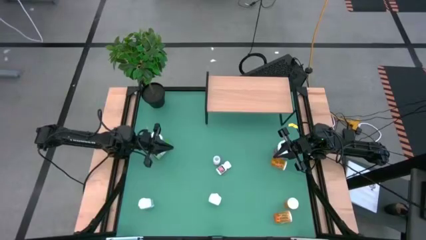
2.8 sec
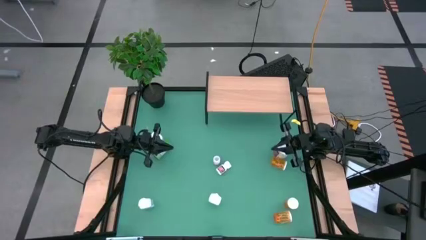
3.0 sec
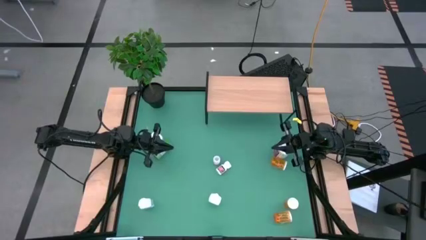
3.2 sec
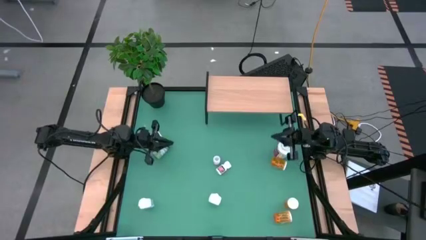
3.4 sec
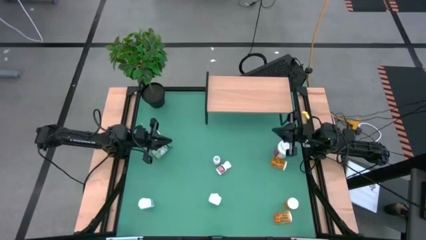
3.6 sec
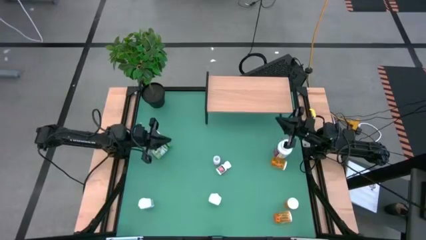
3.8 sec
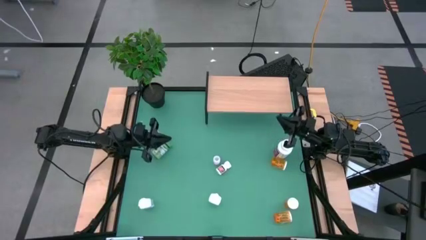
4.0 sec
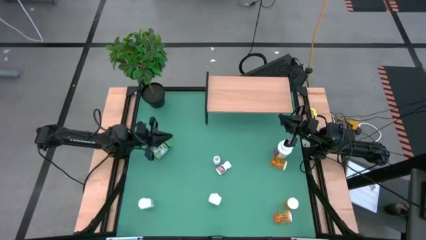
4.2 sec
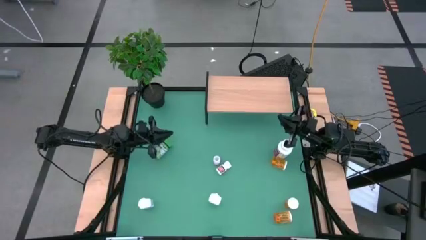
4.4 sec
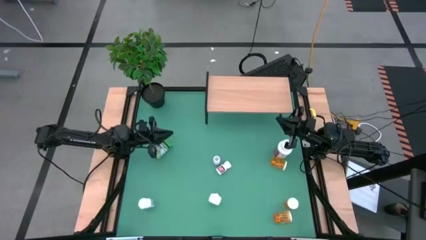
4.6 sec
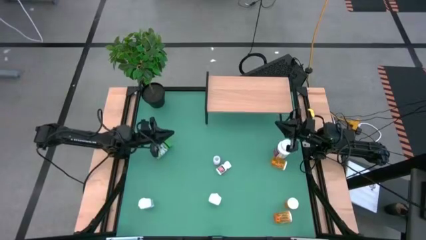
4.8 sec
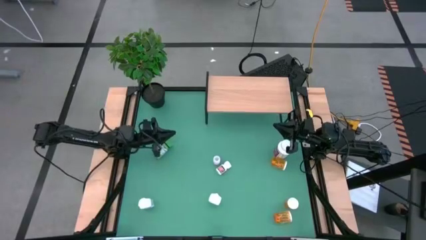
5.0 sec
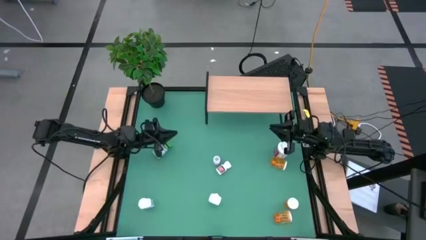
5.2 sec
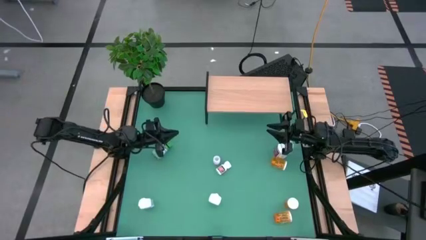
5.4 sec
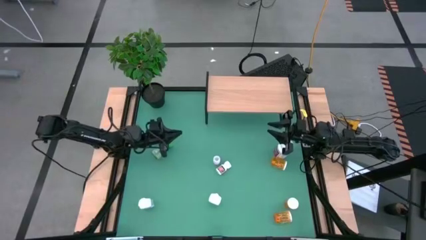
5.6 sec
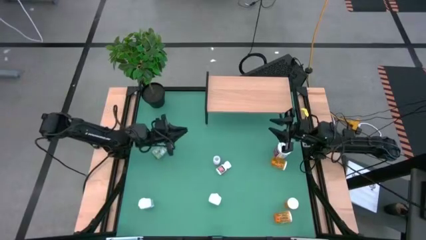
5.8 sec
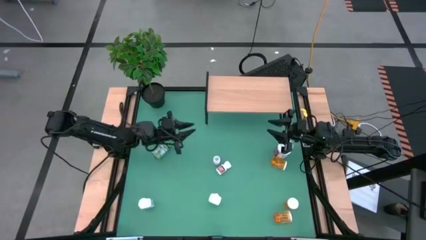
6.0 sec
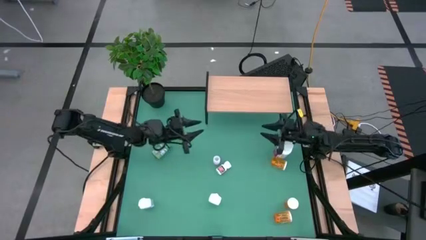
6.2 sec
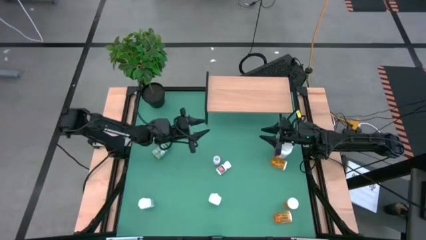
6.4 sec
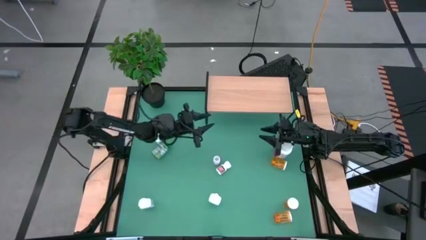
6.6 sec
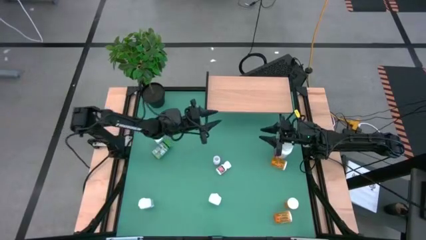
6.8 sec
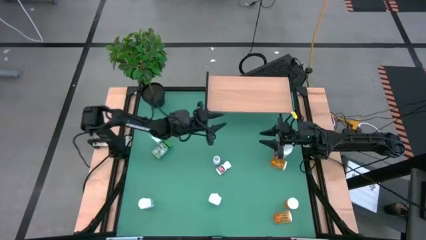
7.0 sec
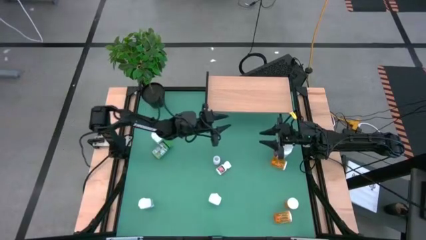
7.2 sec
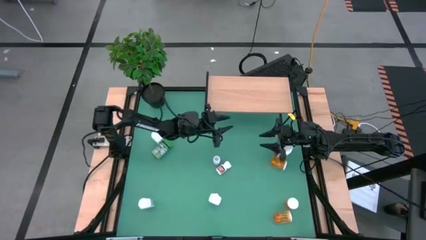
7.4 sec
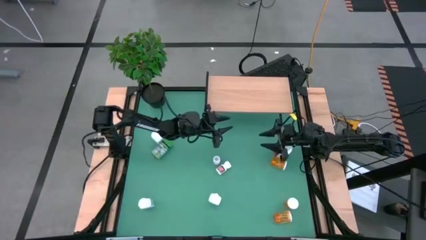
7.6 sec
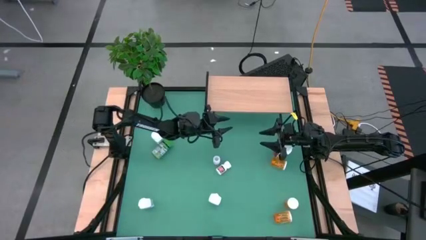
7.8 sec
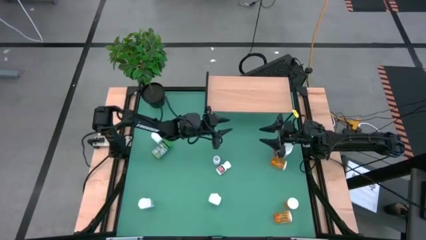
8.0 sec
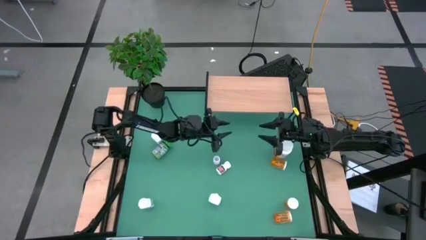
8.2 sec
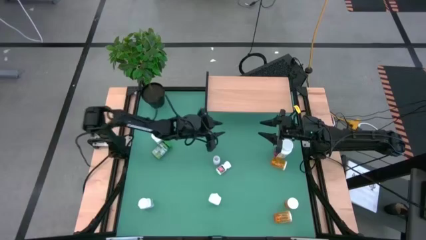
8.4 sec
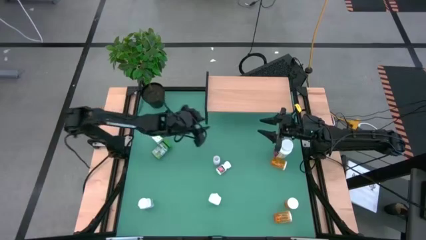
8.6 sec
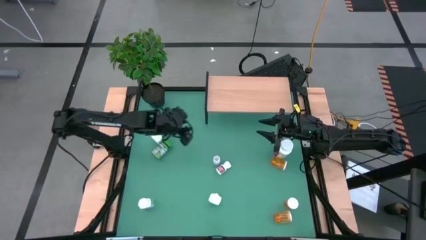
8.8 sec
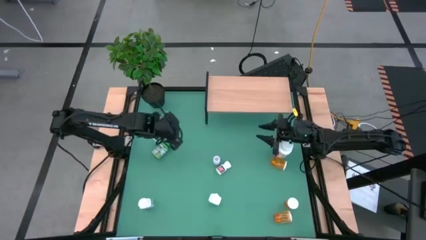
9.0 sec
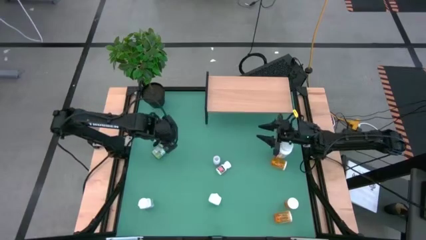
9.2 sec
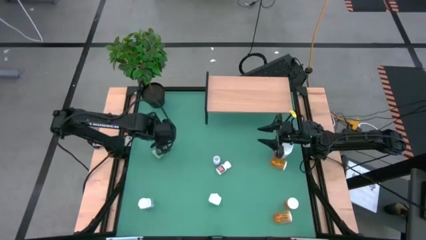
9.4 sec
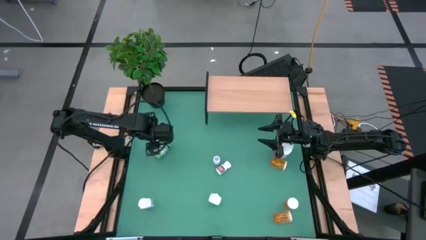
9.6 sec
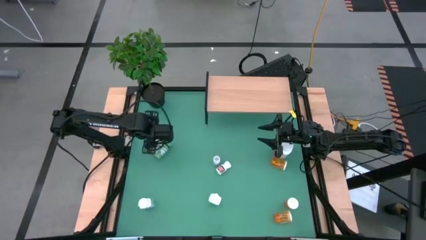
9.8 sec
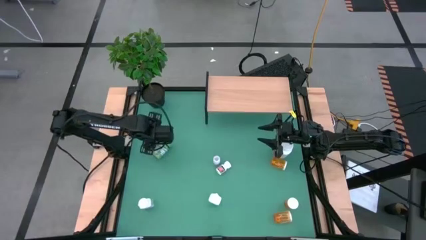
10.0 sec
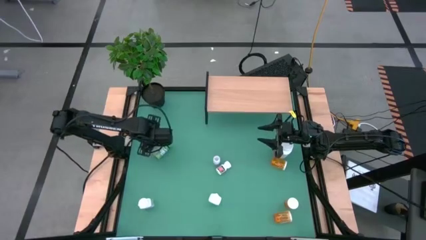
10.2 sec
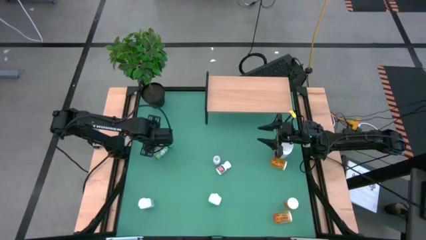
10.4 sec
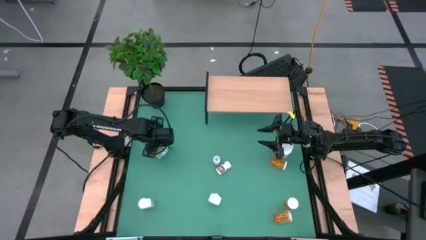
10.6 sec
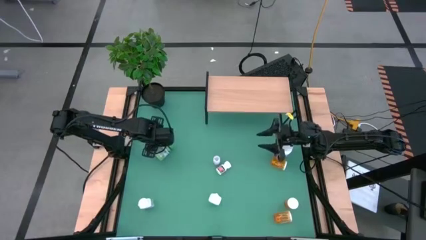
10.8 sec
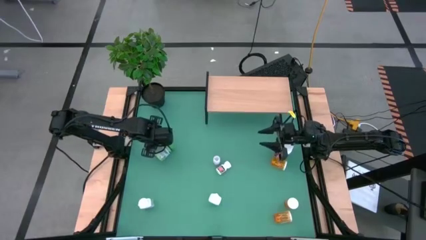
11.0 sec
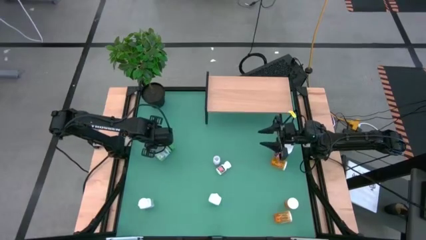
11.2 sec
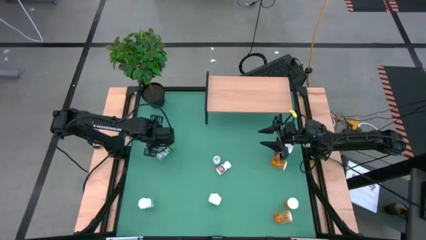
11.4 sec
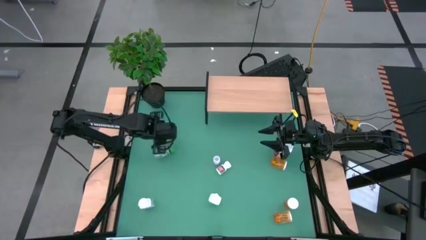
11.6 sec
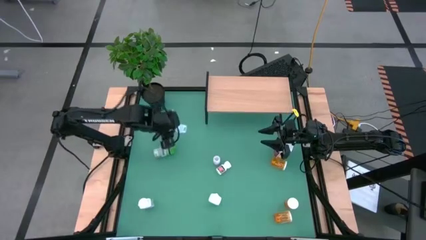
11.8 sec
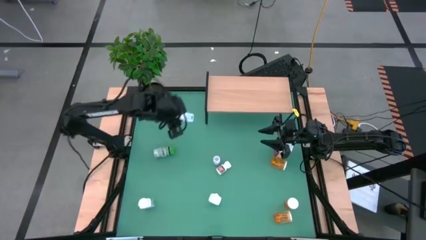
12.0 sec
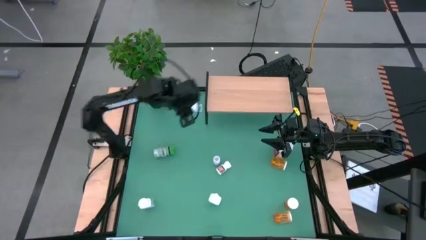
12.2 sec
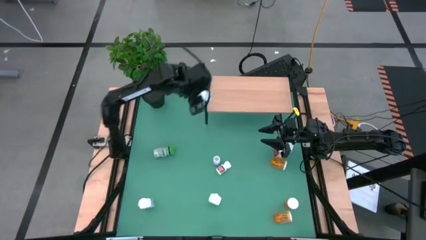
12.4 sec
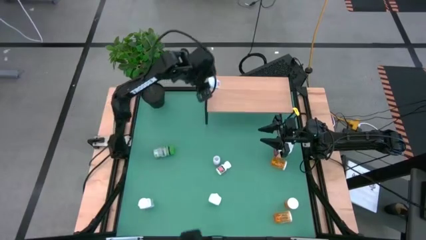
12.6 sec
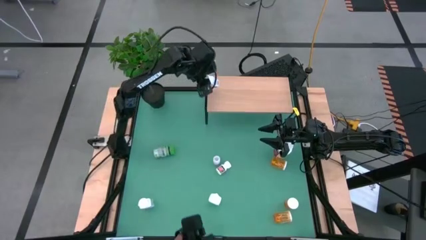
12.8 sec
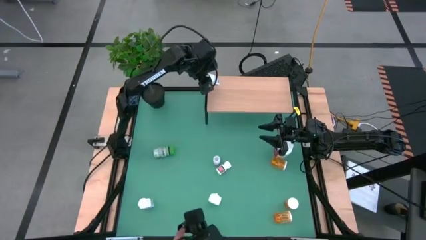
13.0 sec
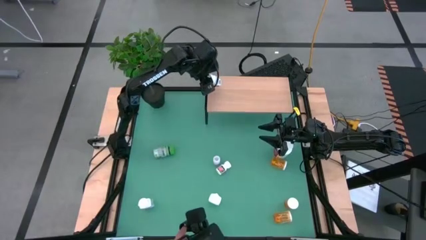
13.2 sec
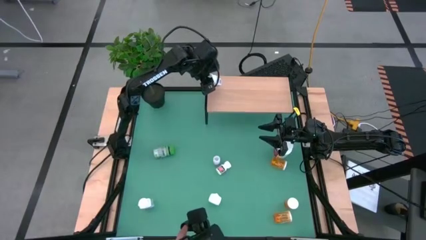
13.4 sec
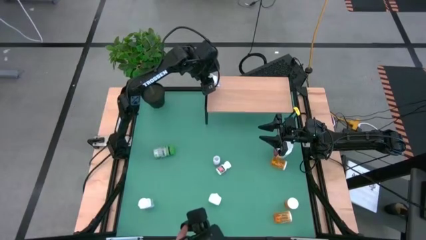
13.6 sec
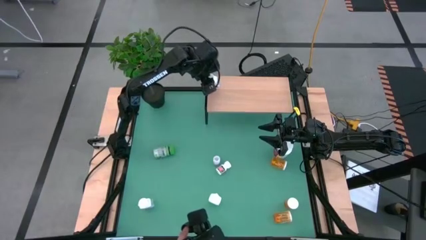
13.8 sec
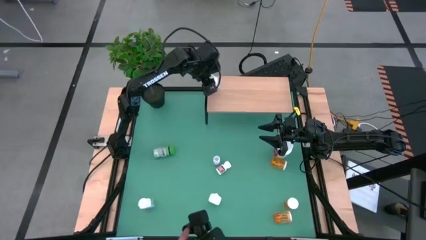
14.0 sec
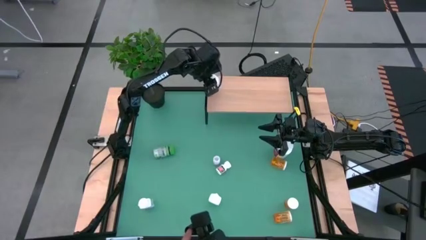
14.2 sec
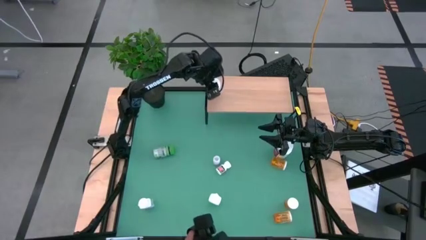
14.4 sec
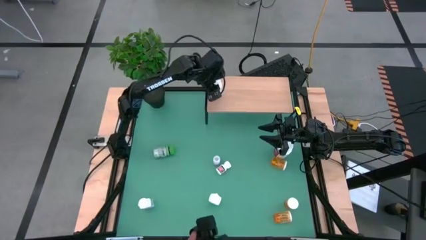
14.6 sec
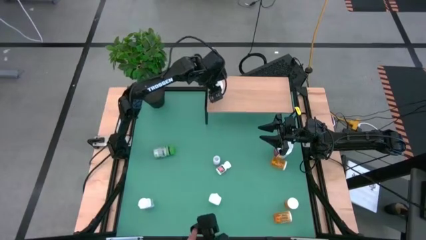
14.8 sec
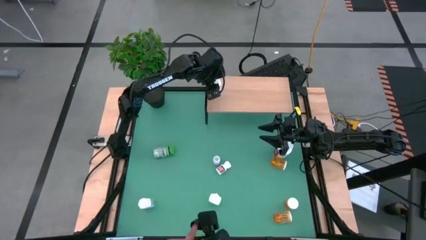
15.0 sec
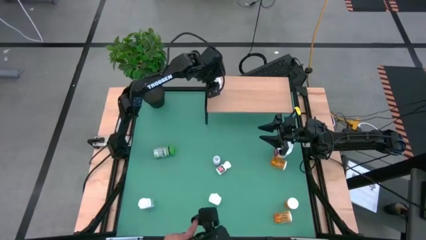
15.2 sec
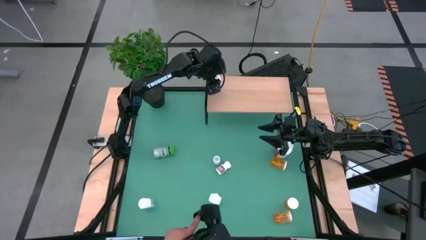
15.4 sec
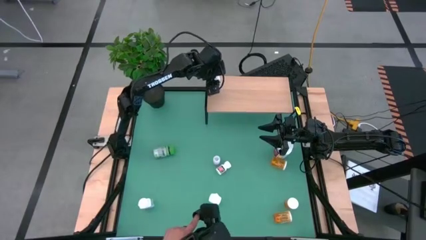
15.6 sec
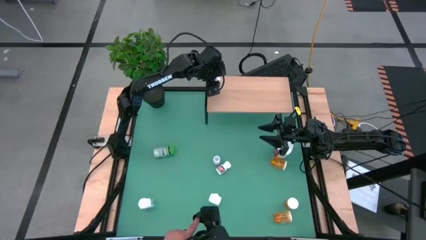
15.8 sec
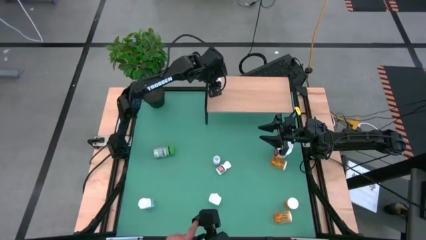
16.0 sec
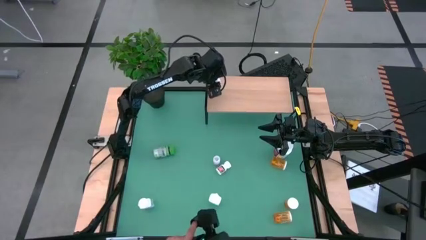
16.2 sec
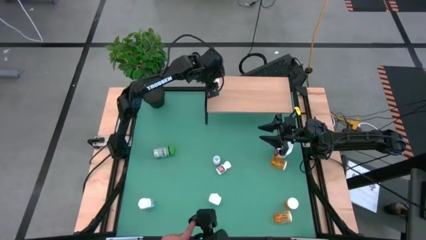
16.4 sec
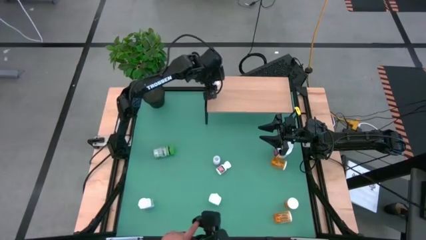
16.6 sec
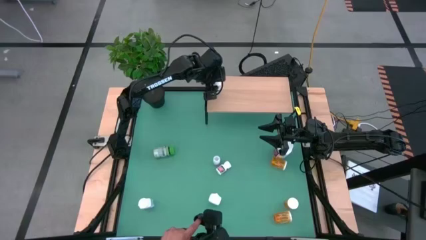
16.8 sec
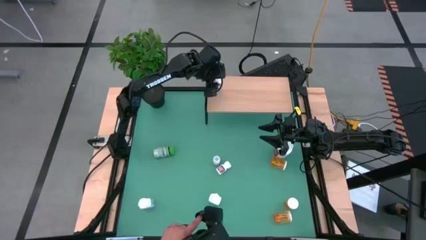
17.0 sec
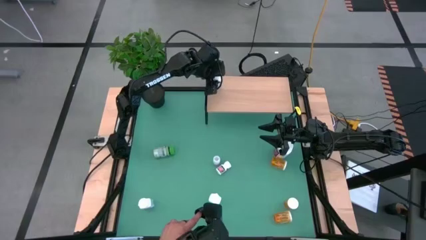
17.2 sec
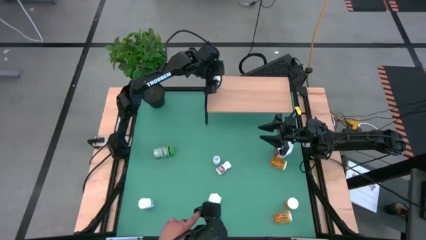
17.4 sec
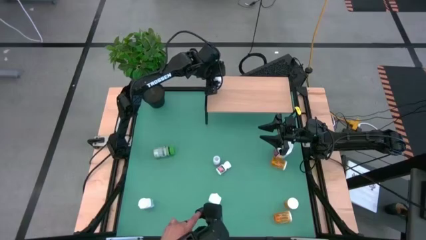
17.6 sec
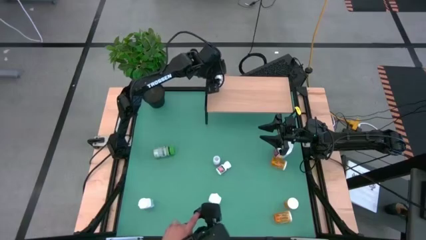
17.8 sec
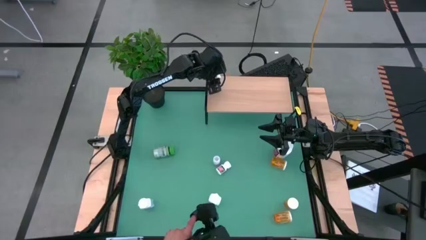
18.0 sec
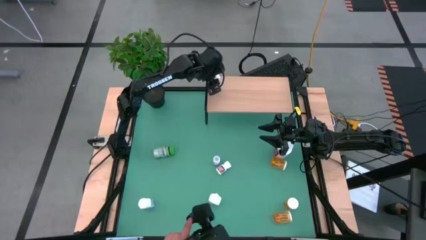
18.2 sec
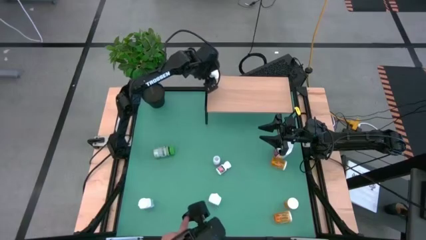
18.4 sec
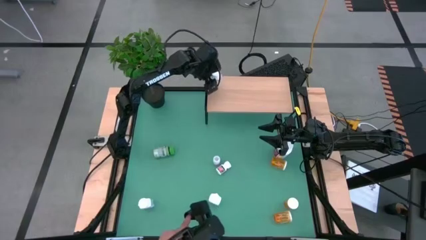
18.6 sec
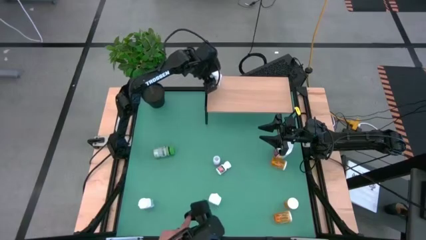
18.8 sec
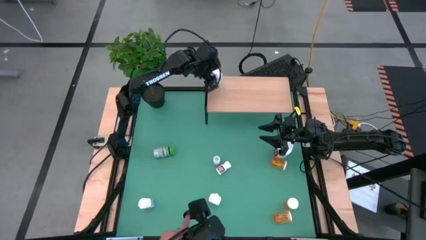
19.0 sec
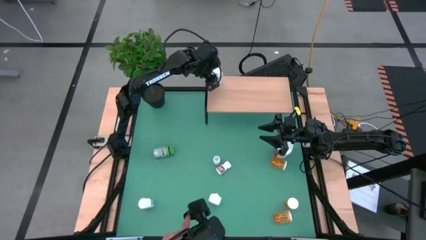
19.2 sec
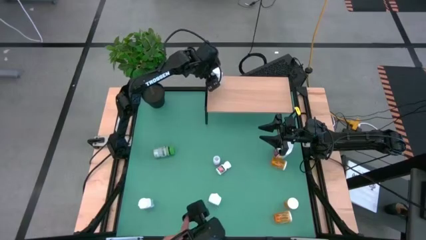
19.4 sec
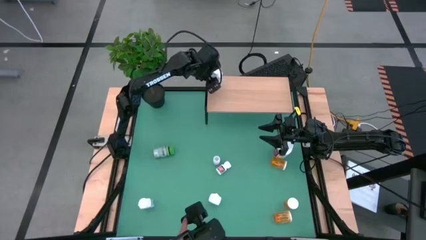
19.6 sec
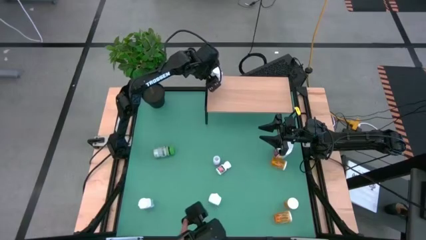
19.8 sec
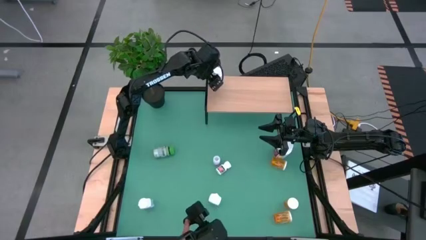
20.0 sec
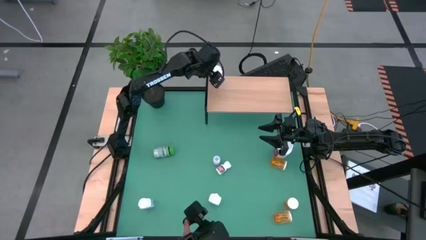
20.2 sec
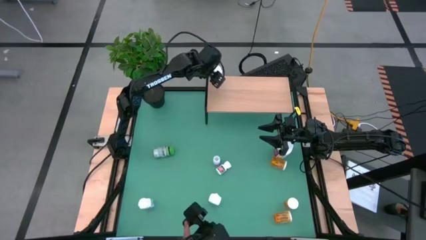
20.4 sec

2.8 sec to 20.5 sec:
Task: Pick and place medicine bottles onto shelf by color
Put the top white and blue pill bottle on the shelf
